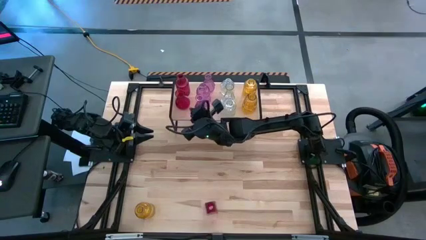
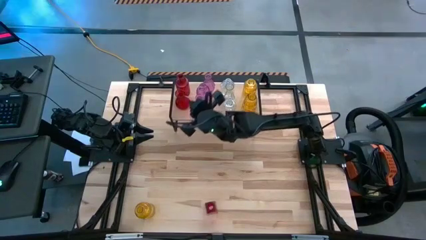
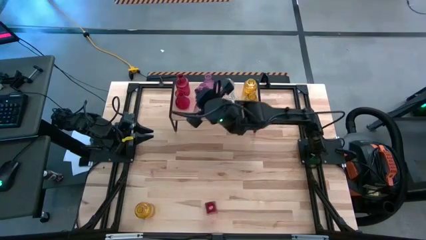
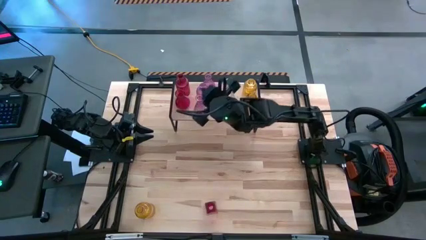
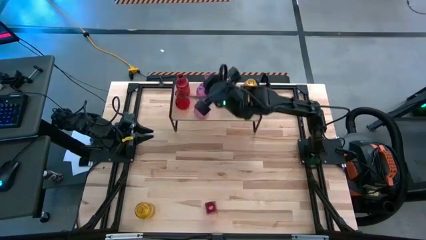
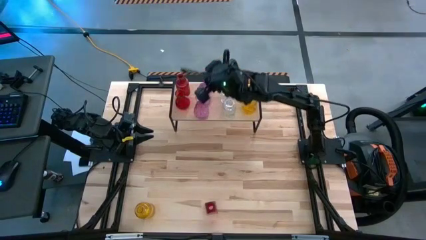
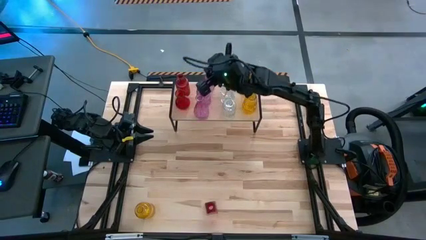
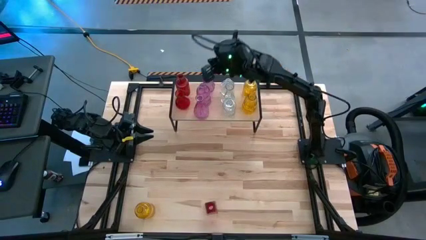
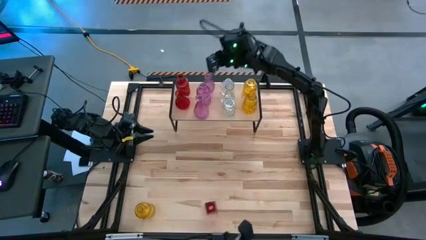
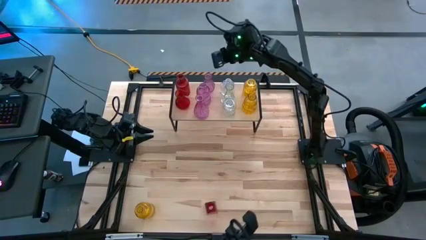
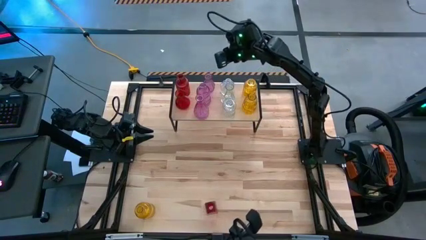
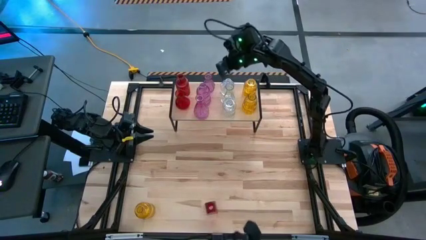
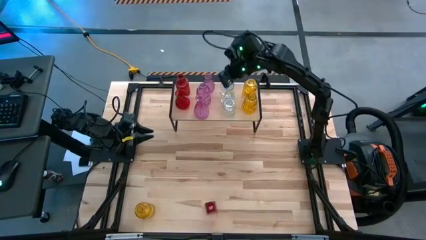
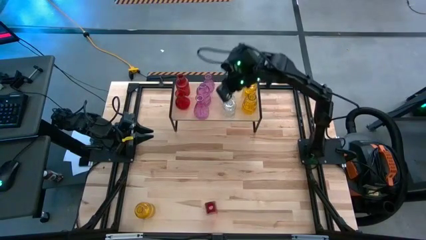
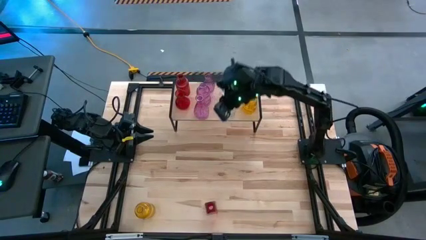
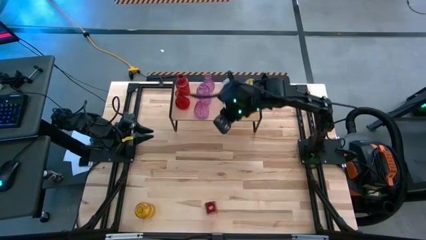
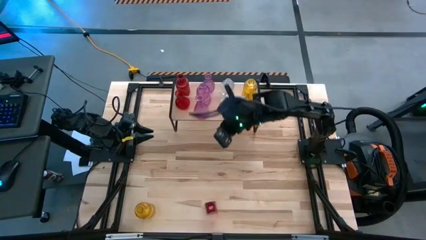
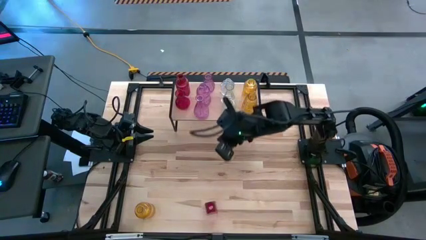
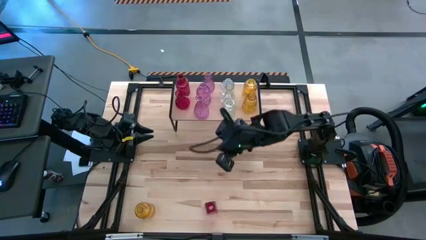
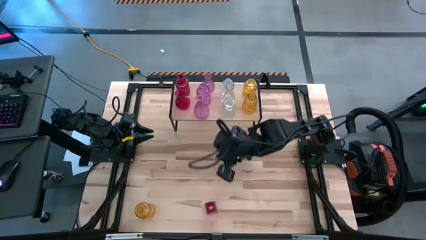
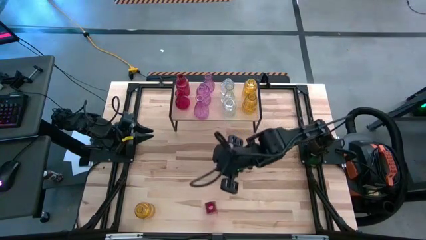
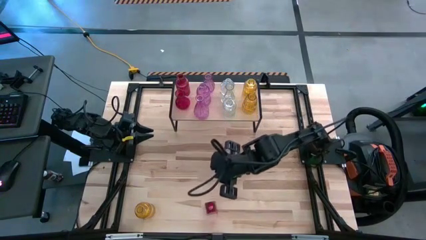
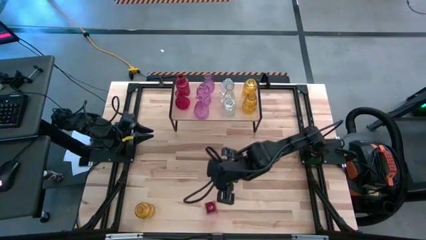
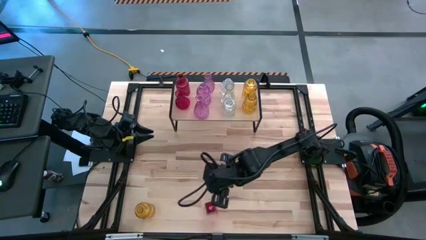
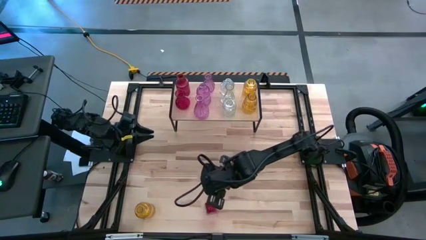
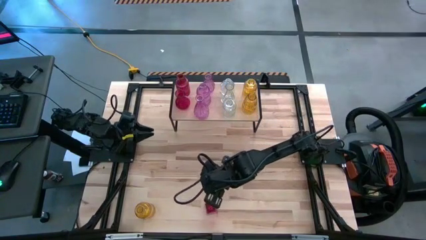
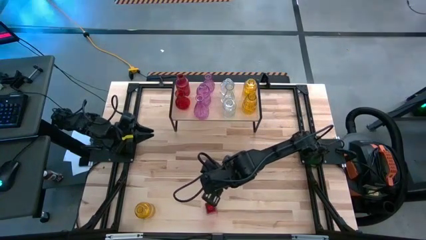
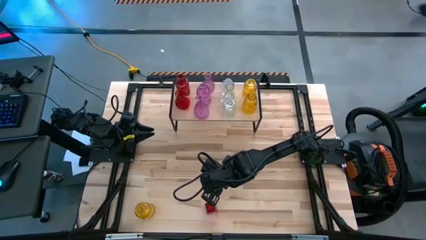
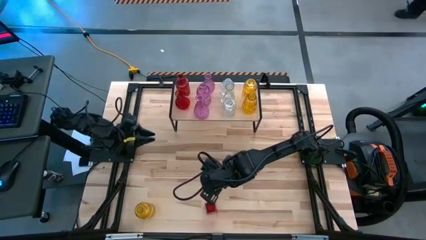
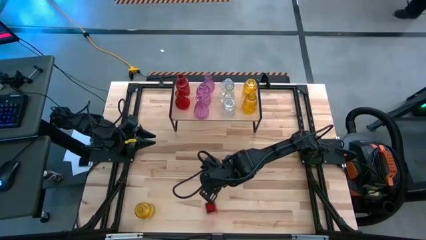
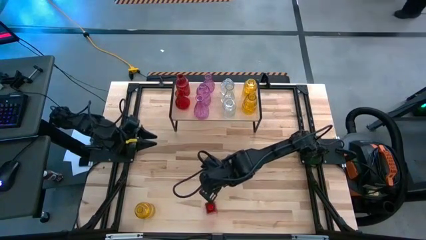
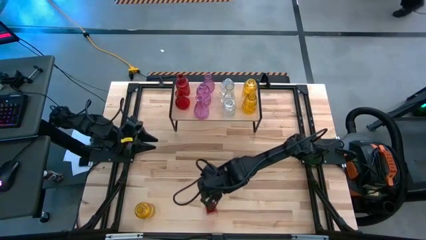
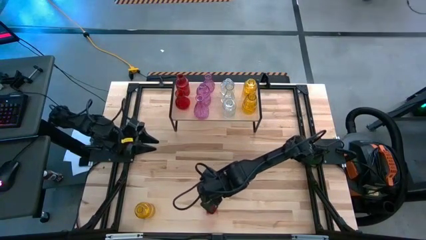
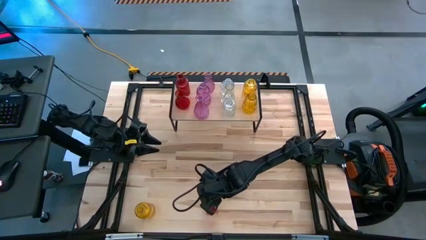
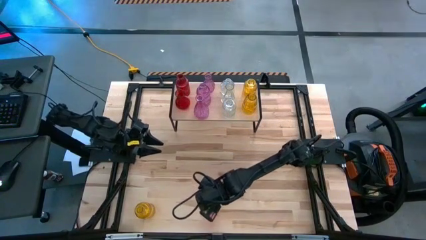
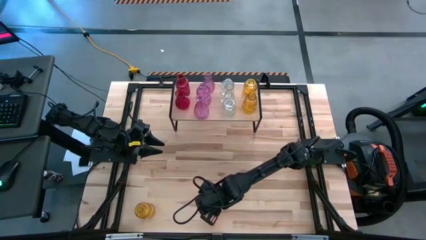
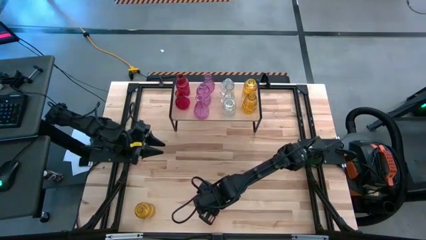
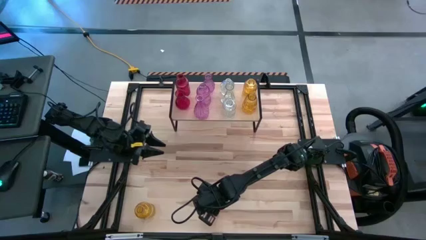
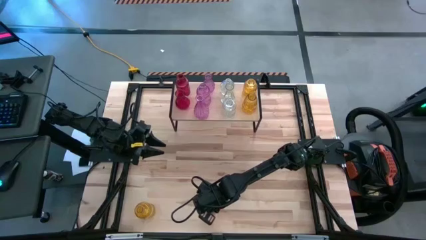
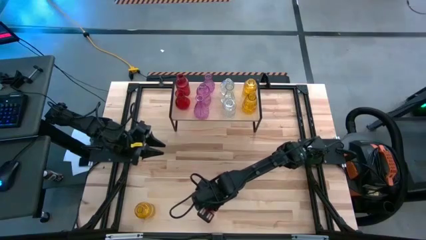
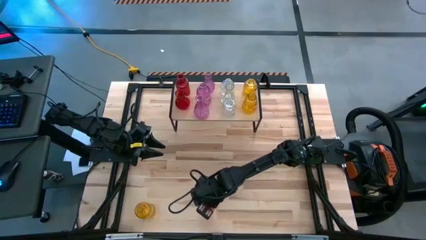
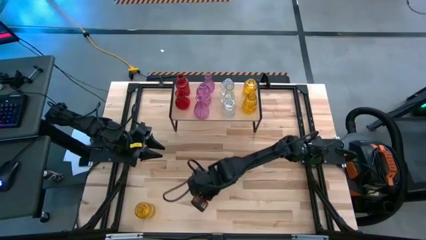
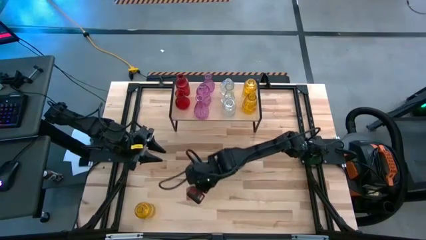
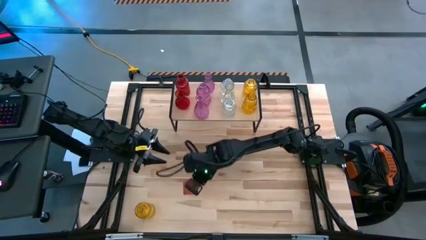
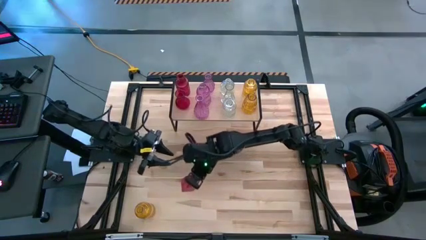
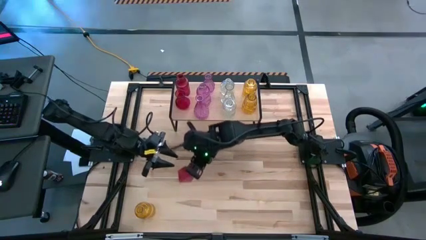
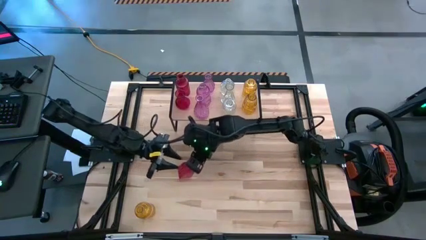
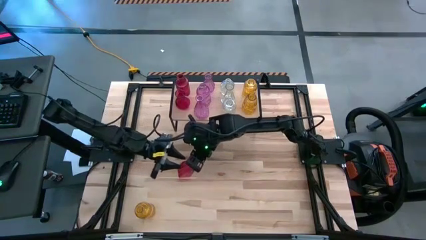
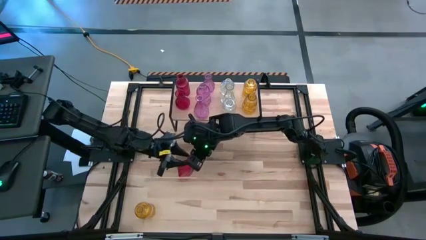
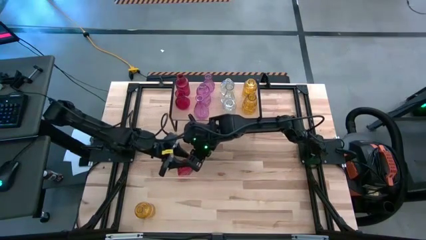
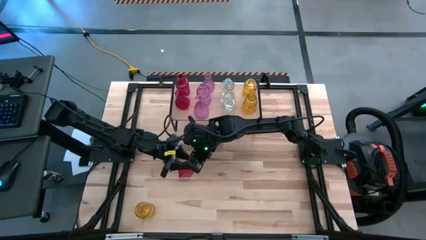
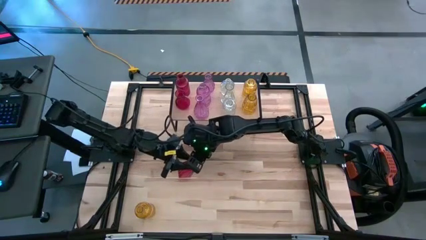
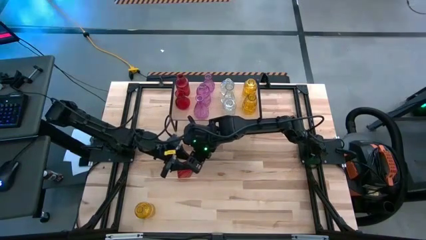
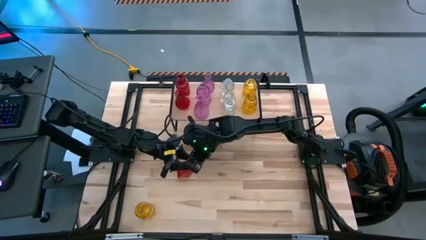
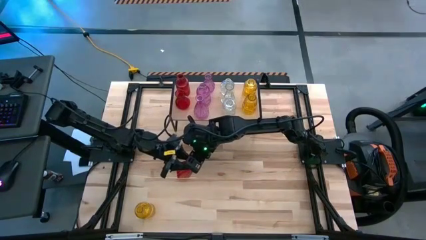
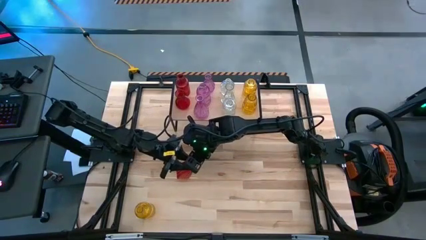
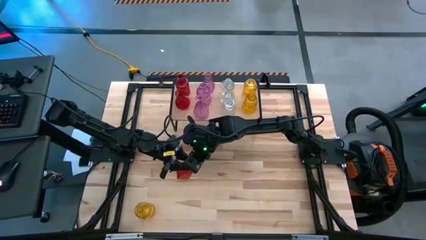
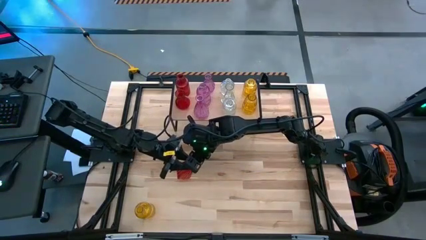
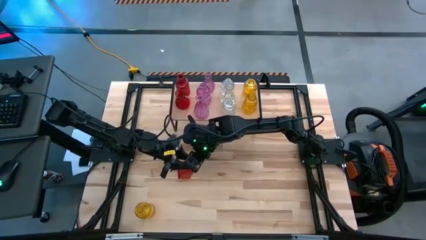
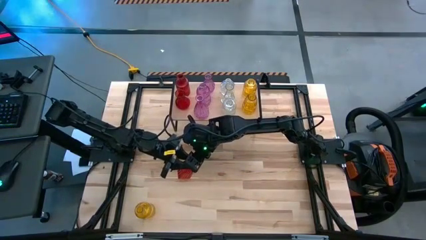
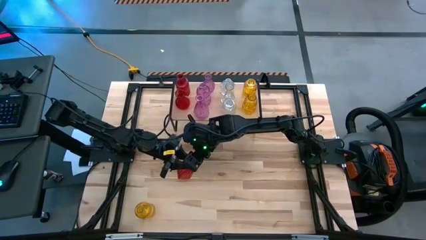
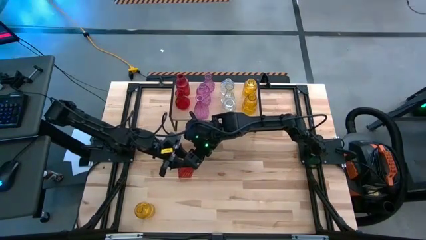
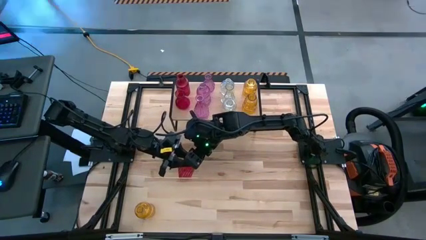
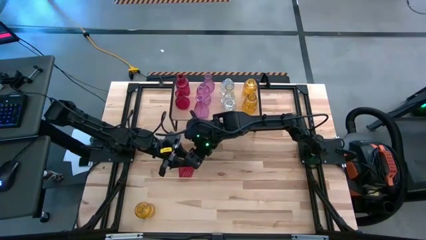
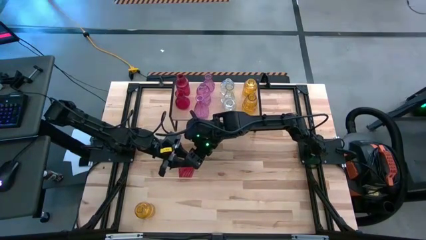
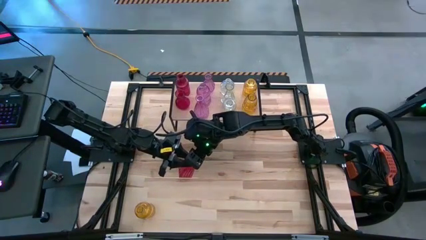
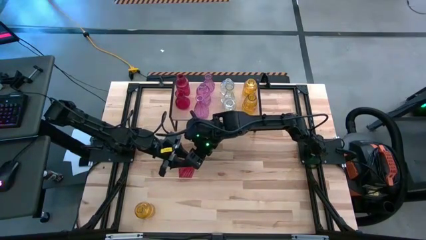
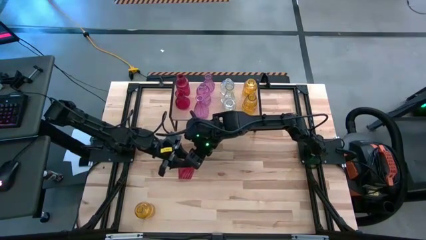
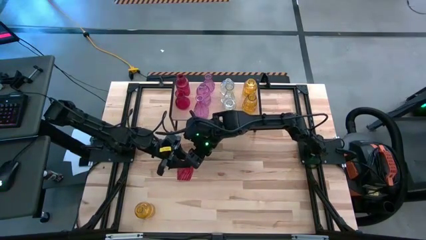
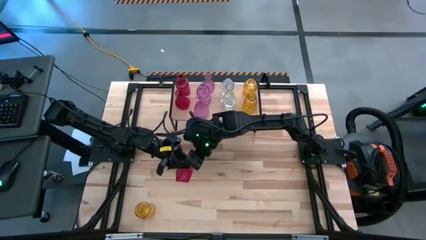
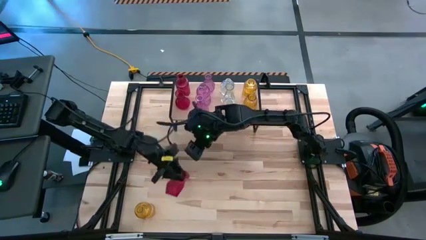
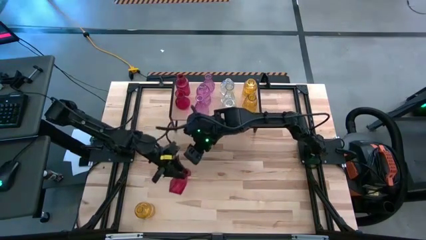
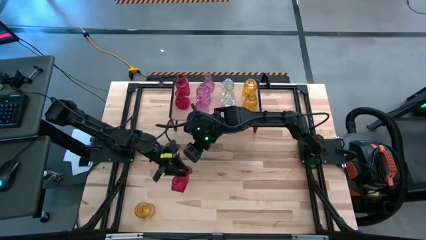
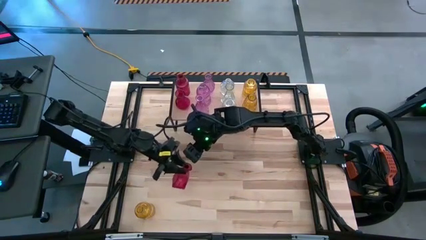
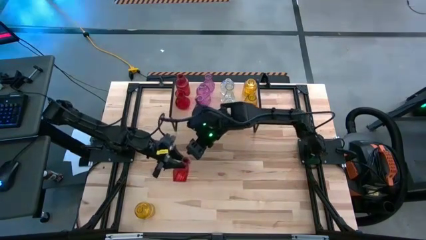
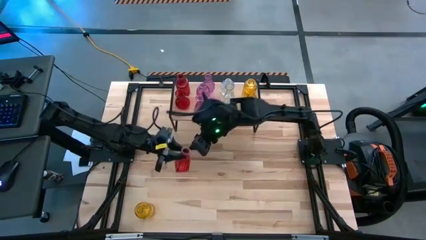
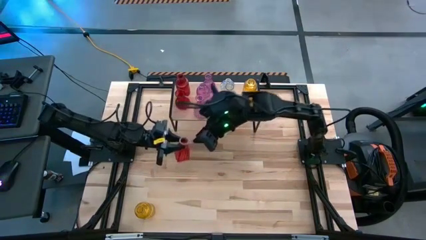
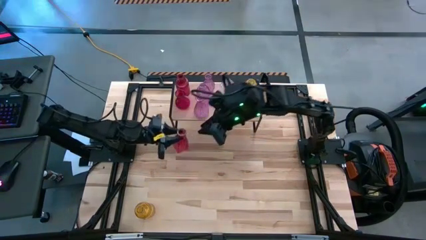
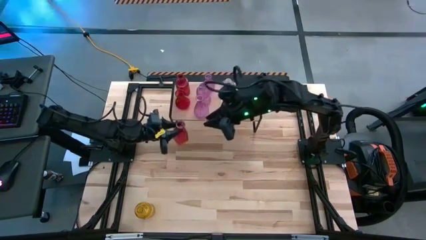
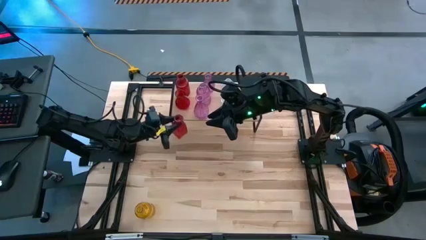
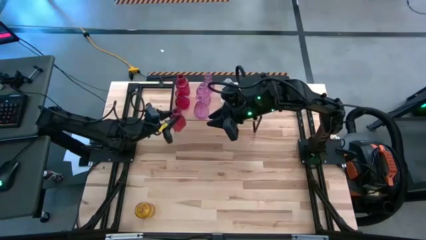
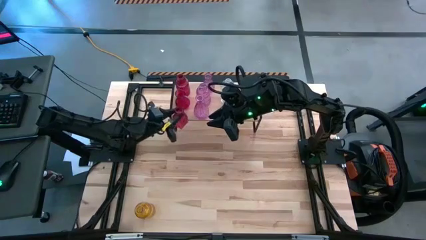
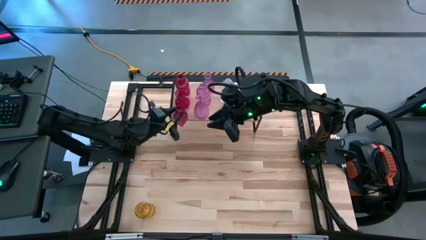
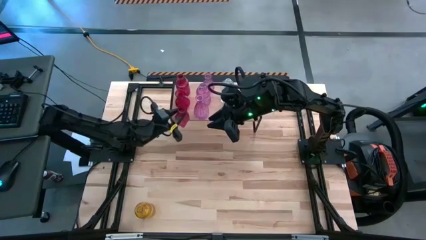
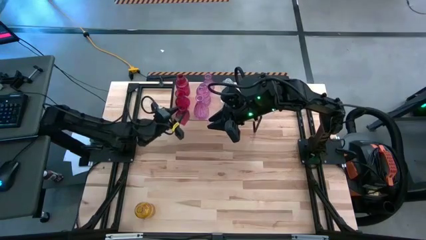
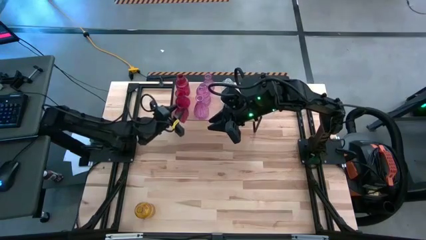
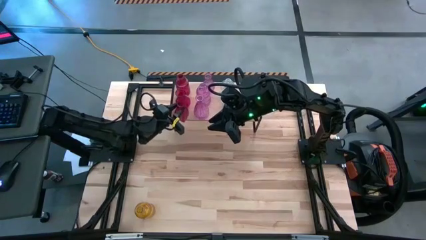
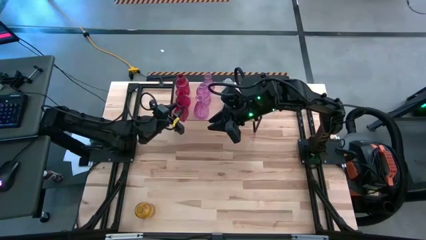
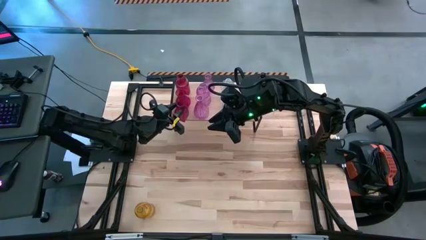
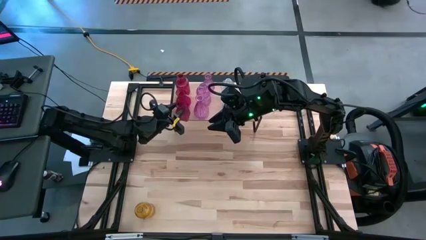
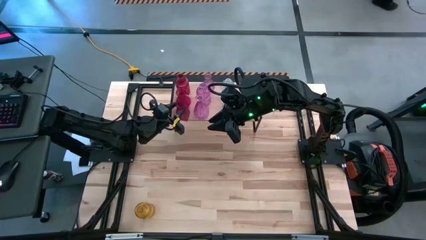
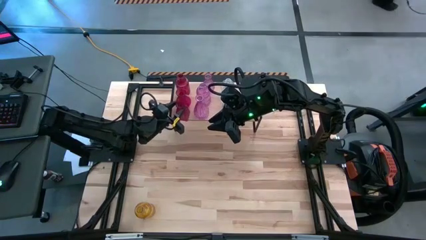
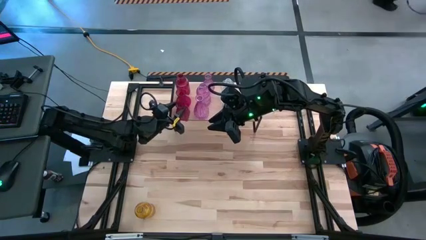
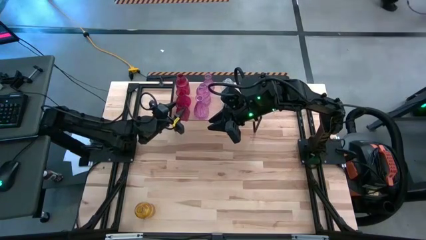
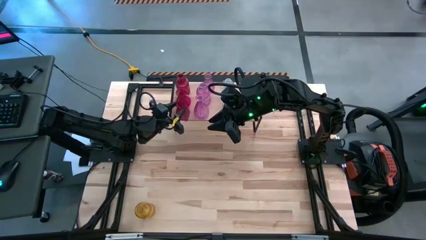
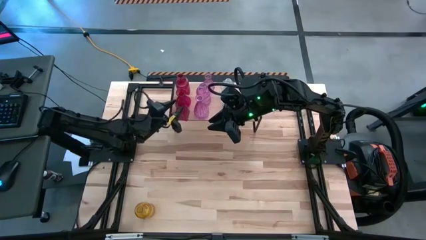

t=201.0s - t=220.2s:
Task: sort vases onto shelf
Put the red vase on the shelf aligned with the other red vases
